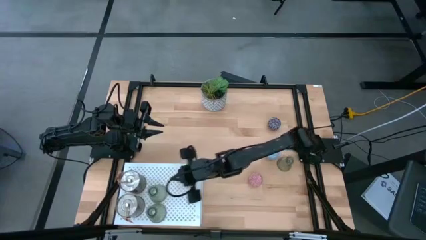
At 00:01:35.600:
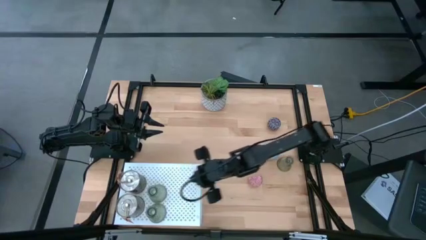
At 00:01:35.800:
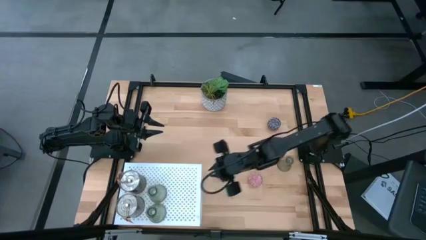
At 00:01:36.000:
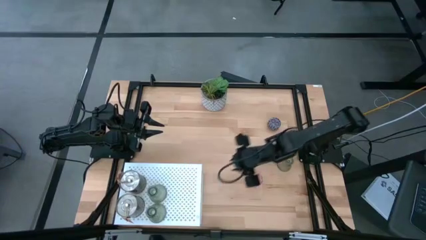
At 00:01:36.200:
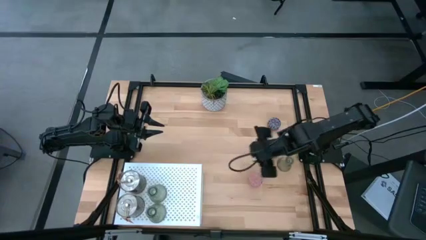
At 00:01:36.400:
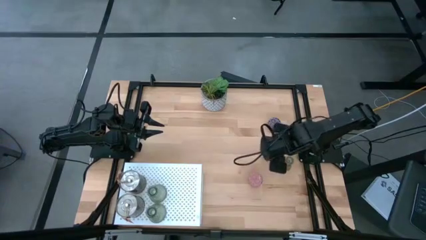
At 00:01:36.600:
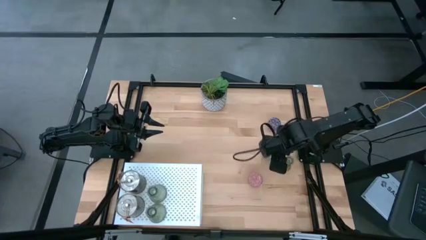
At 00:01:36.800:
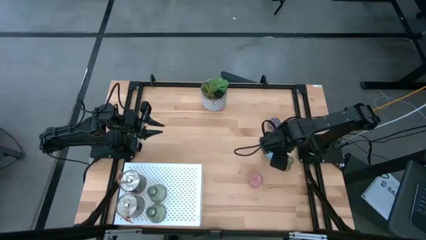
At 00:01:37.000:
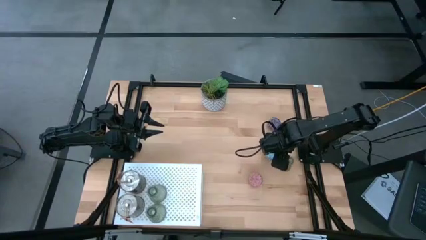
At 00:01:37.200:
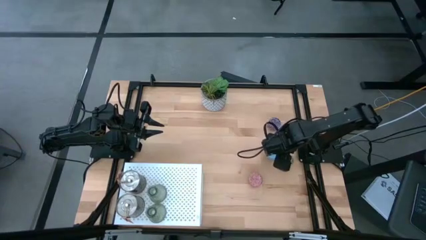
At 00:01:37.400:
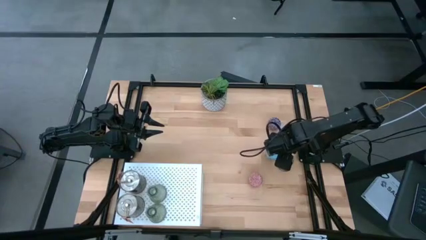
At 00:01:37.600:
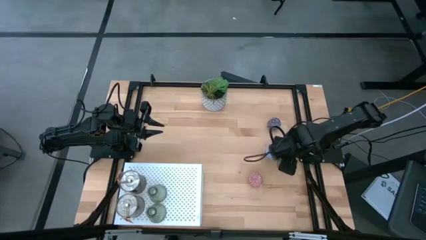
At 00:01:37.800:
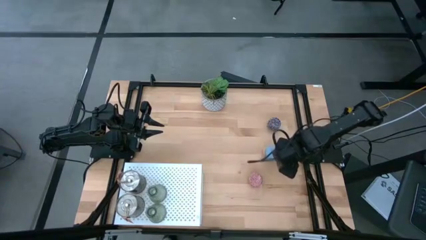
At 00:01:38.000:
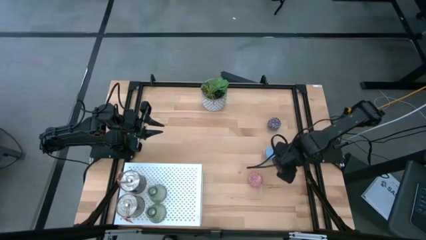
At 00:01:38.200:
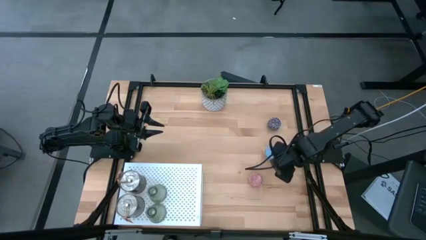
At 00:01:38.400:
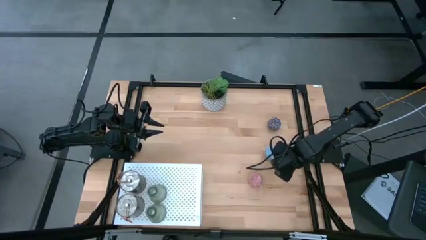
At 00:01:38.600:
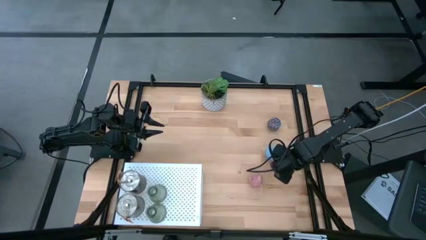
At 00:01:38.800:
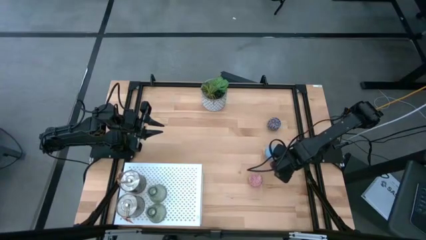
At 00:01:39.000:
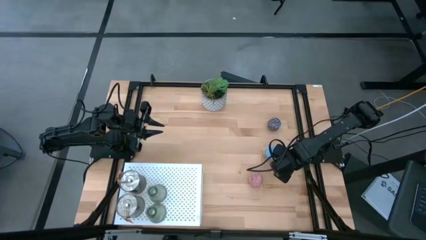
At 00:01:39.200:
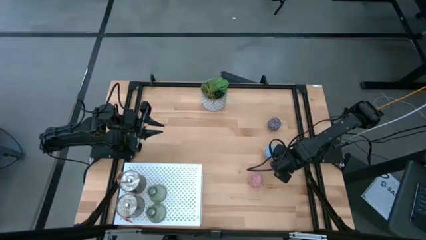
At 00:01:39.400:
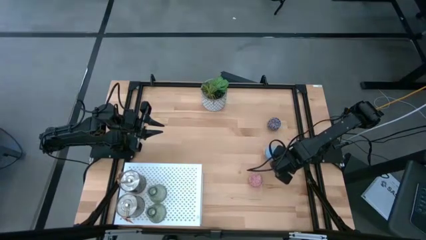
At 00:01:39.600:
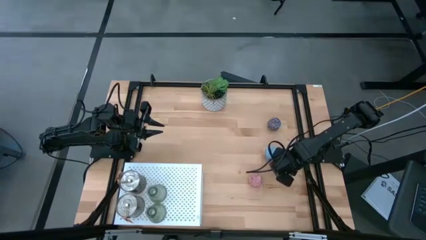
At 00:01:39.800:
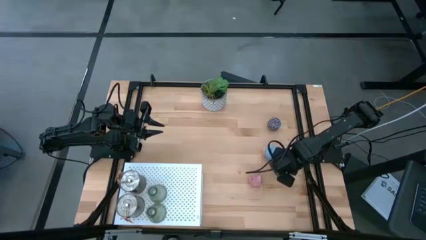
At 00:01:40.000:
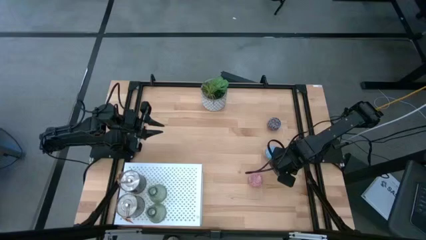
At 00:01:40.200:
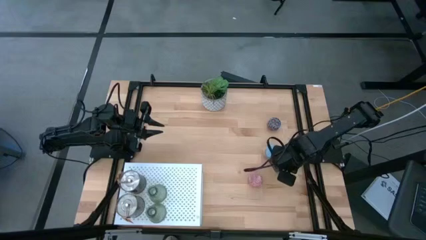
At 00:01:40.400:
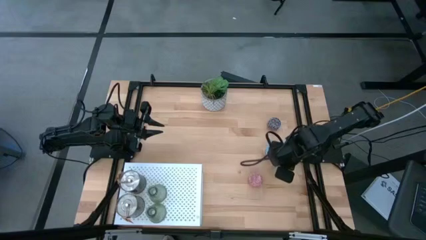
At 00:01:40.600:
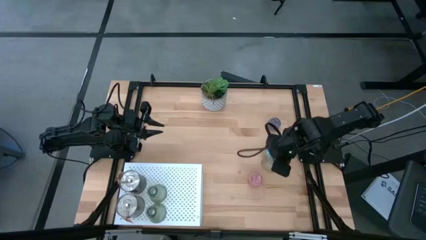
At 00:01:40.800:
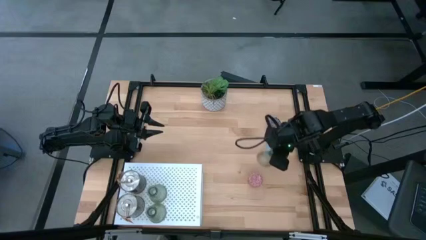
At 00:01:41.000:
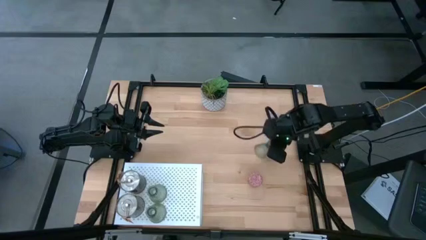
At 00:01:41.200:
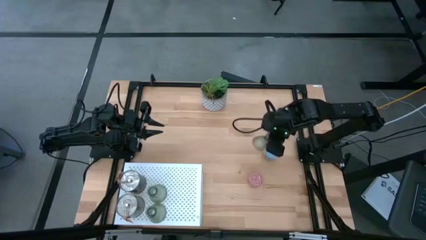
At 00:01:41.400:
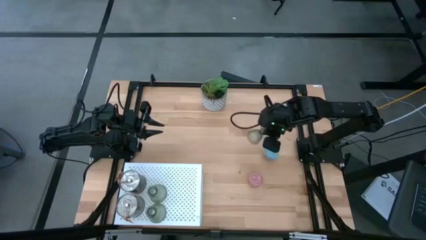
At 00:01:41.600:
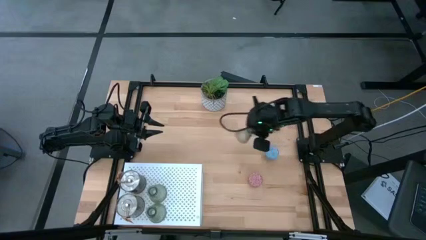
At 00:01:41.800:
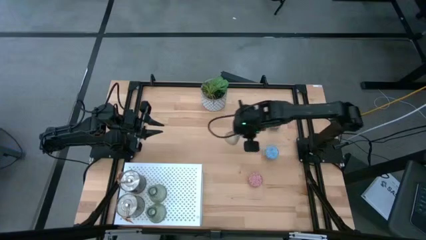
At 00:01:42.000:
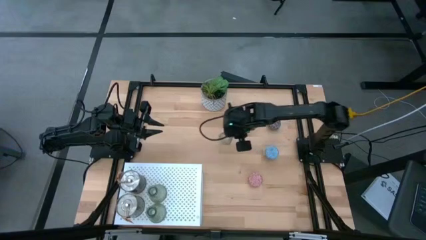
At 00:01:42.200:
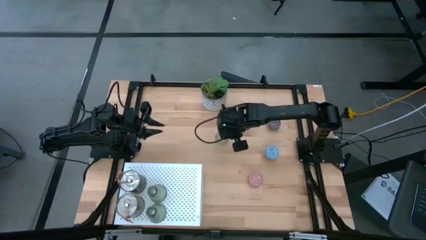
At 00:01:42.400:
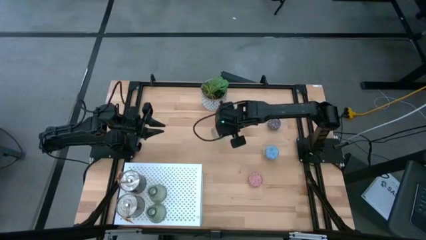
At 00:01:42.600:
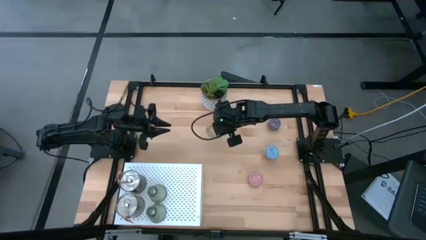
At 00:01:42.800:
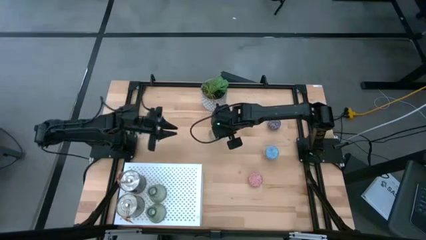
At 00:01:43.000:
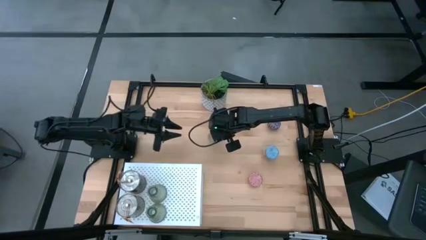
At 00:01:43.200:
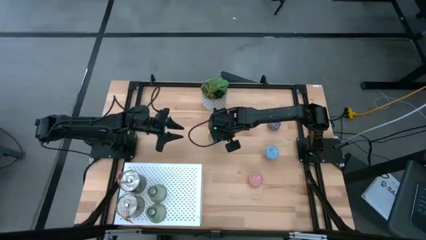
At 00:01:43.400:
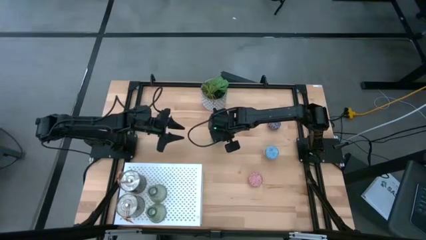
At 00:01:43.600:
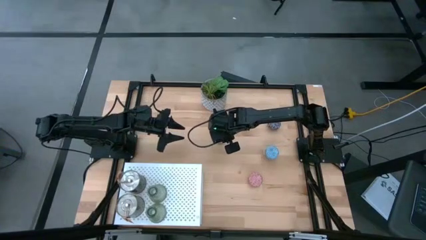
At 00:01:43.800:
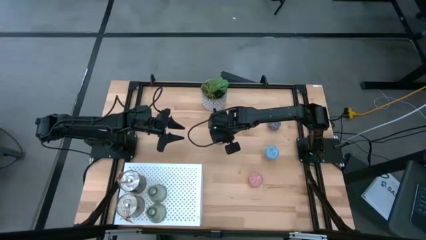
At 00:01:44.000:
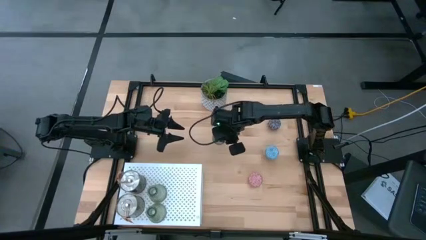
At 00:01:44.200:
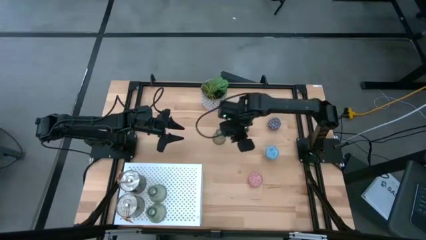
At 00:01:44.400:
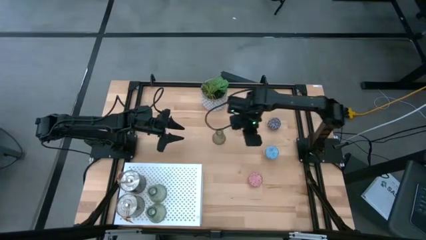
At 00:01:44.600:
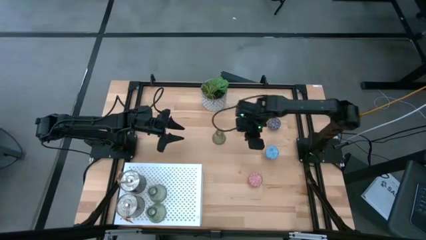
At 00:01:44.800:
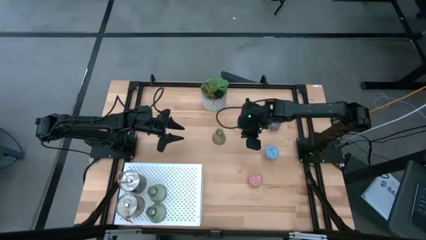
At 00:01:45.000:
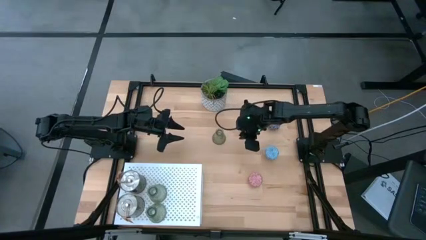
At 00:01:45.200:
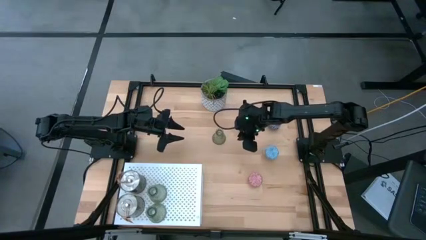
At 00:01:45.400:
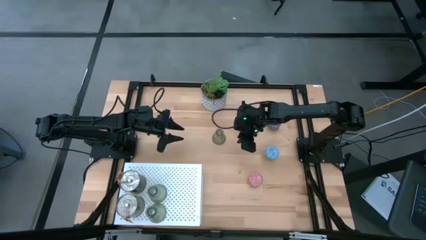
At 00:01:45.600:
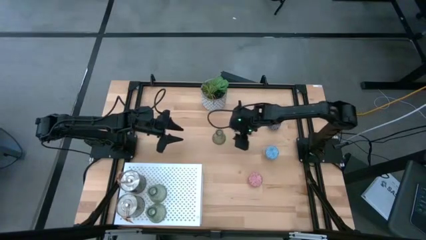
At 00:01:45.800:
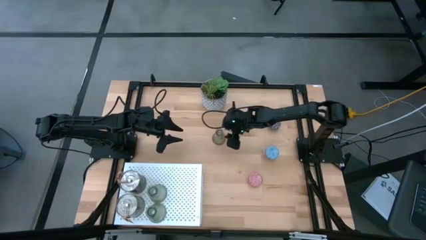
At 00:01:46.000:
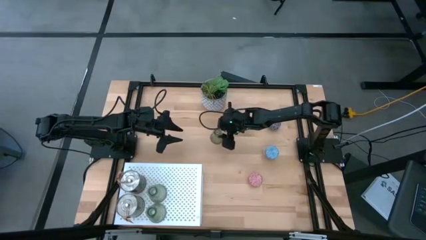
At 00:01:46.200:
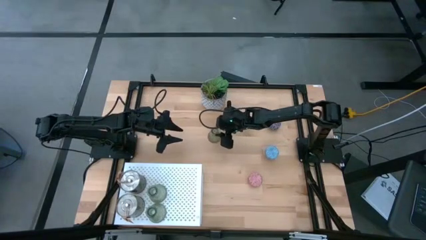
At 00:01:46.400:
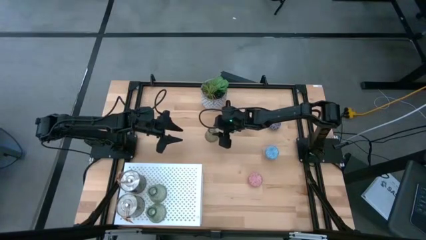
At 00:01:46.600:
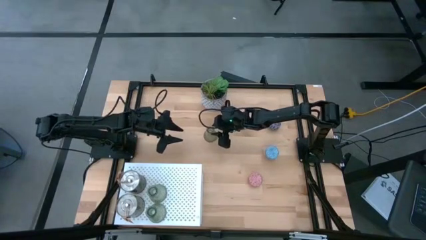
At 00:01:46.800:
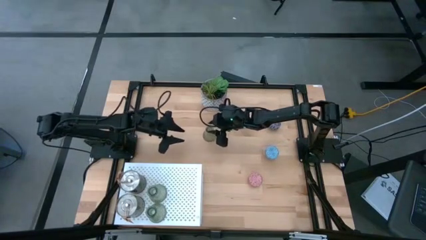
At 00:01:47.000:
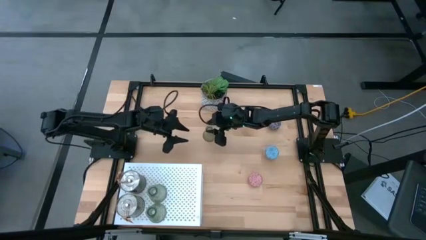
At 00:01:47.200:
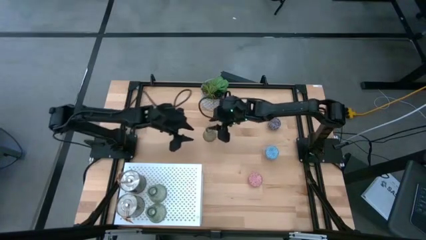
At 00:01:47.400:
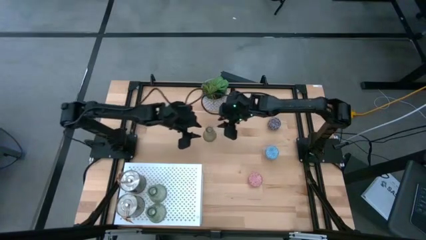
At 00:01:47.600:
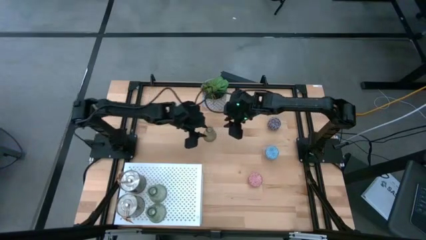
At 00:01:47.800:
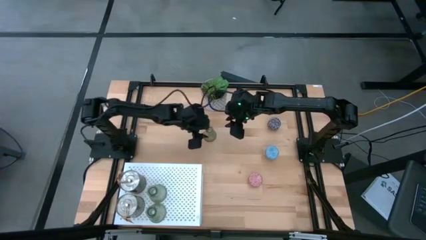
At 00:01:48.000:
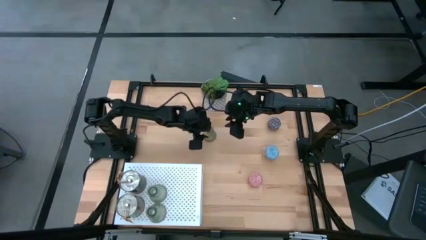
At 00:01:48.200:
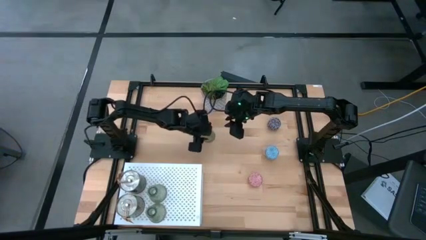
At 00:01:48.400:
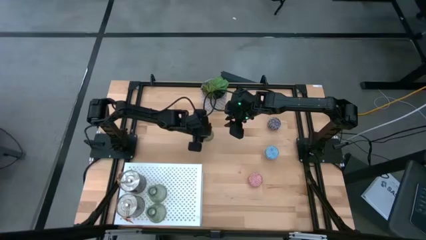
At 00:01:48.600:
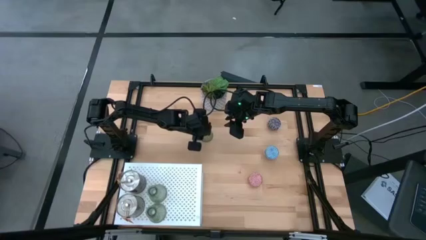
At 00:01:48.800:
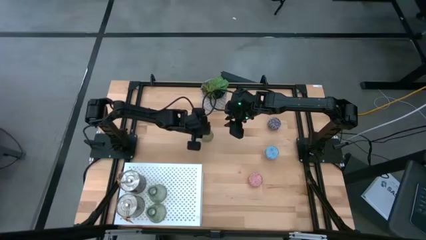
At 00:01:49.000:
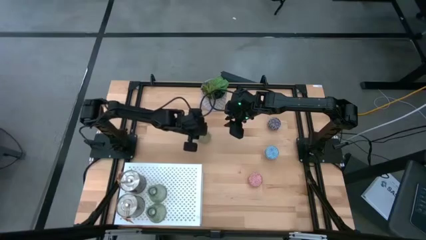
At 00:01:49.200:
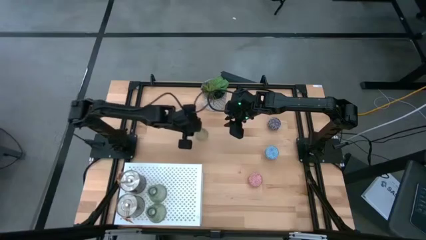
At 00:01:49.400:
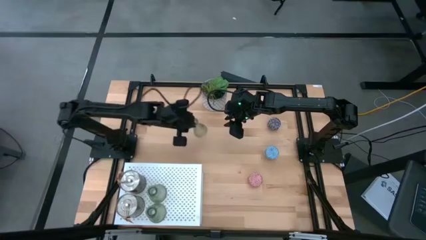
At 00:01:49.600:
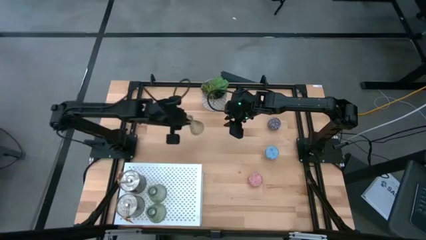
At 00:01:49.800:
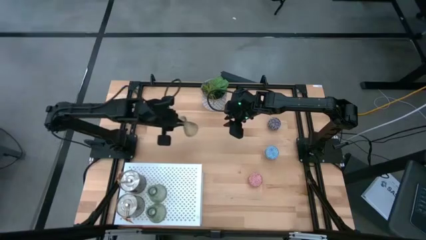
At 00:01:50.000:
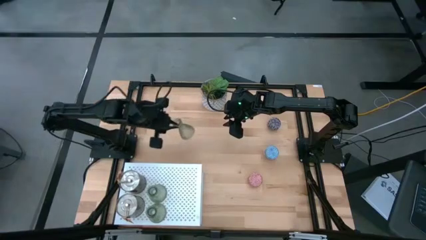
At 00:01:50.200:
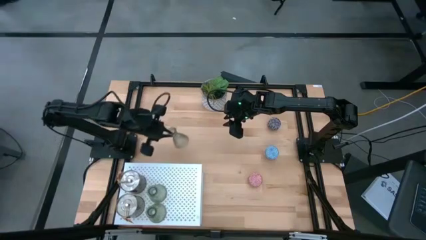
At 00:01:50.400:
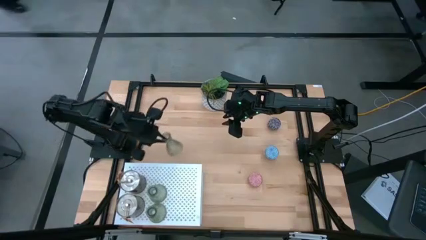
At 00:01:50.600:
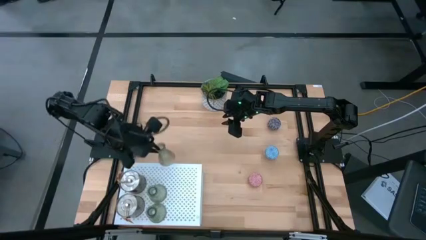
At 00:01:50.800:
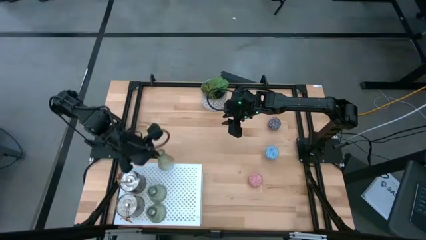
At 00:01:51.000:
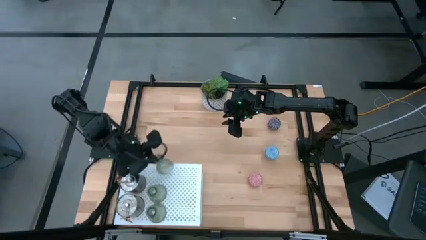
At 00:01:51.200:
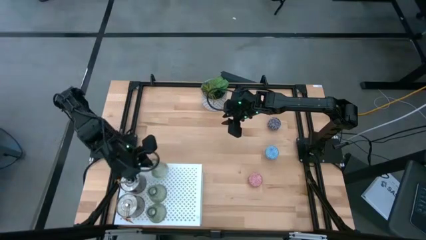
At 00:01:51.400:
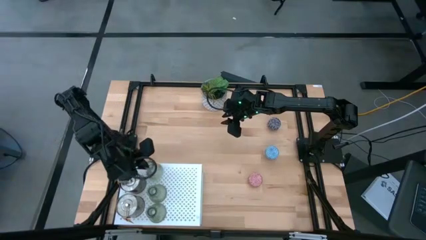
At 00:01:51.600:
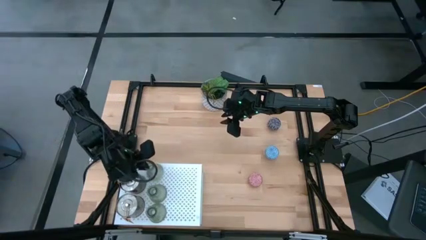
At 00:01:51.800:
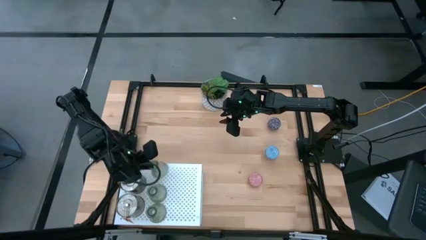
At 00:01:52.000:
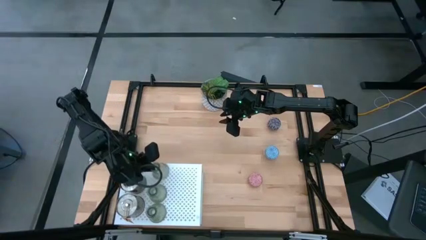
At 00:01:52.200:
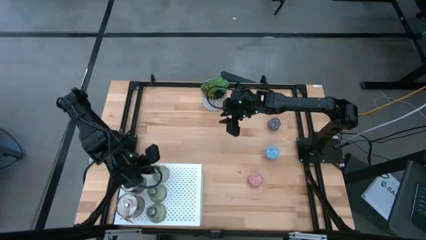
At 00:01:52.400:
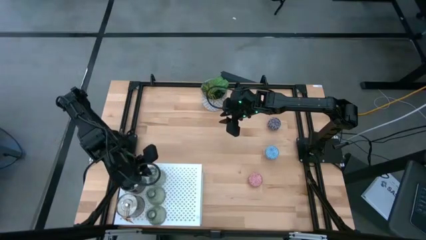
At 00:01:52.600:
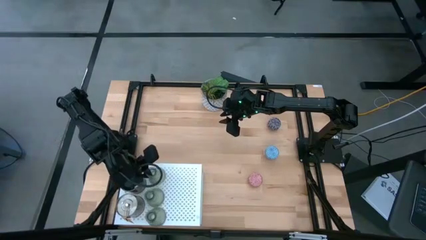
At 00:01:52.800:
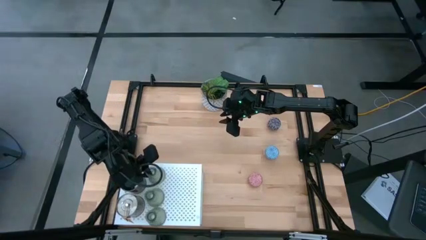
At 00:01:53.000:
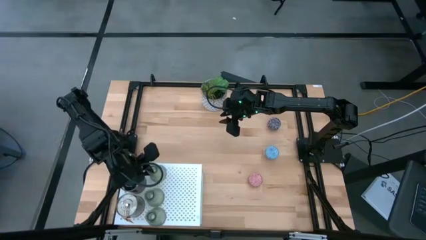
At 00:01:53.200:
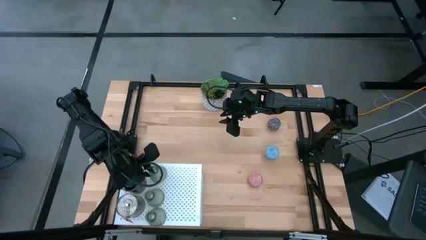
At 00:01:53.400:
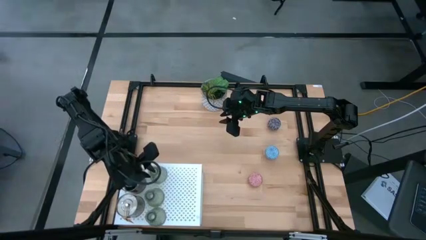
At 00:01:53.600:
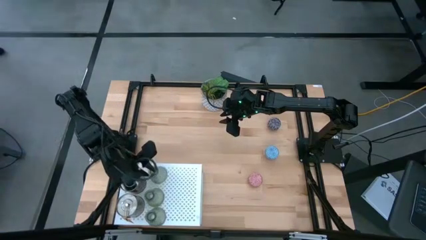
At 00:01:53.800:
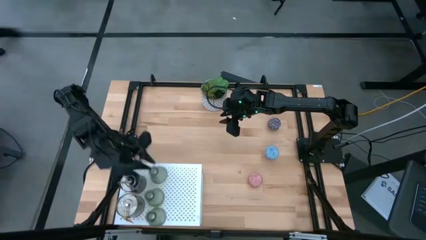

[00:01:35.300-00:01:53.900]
Task: Pick & Place candle stick holders
Put the transparent candle holder on the shelf
